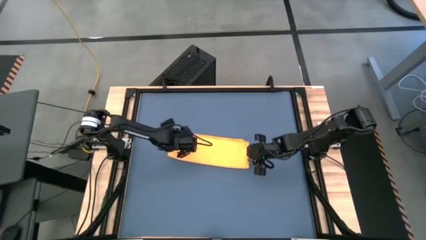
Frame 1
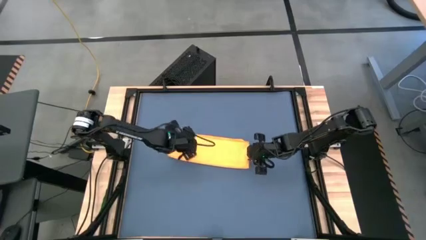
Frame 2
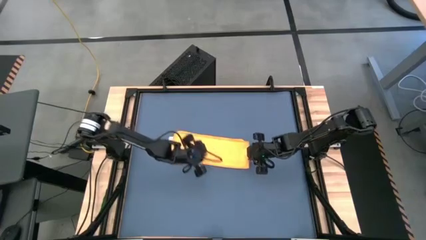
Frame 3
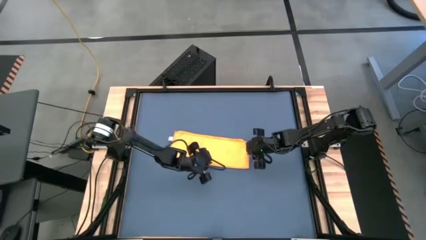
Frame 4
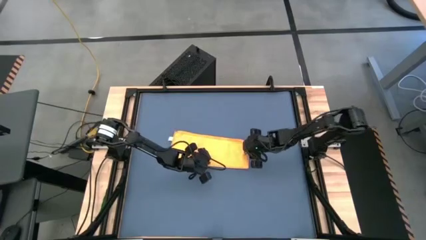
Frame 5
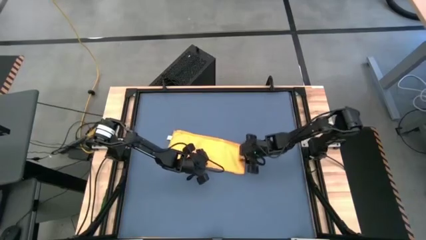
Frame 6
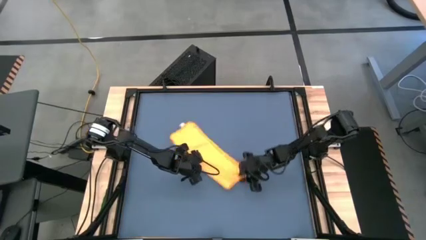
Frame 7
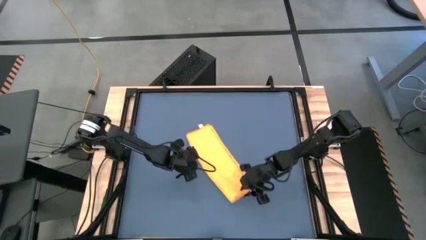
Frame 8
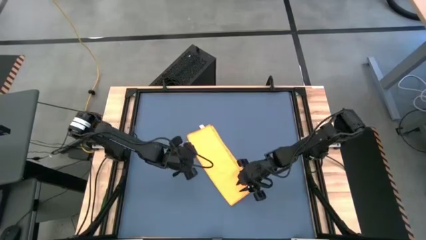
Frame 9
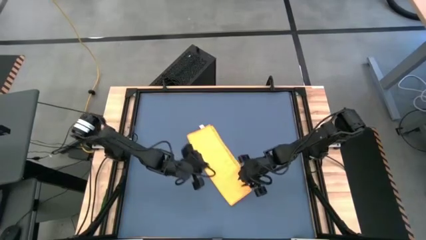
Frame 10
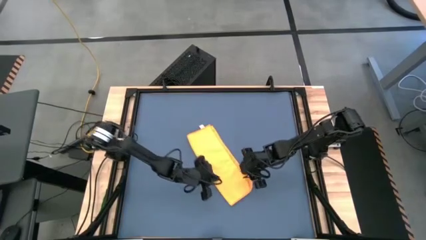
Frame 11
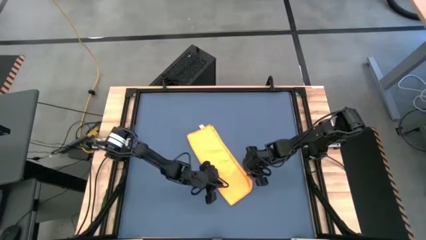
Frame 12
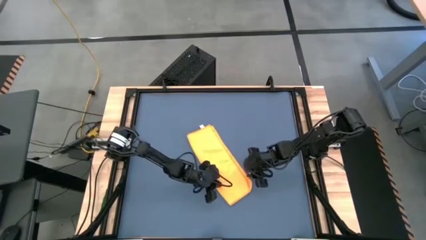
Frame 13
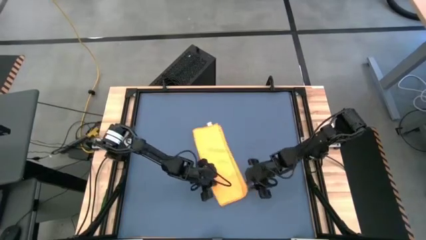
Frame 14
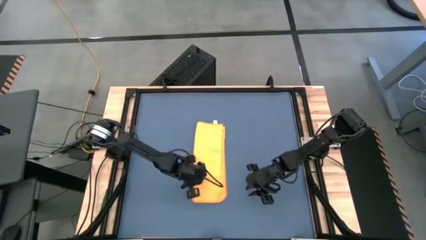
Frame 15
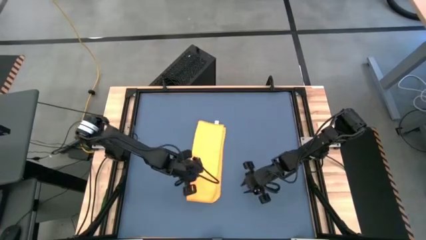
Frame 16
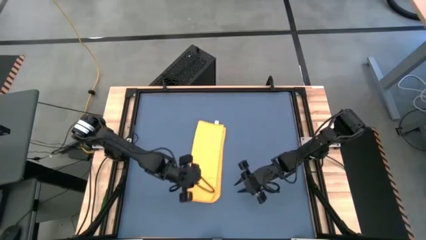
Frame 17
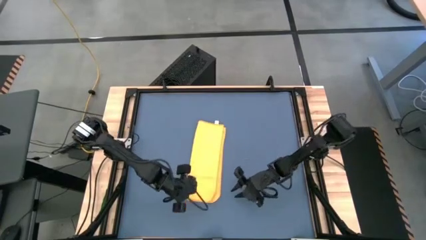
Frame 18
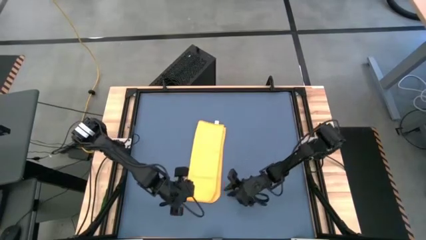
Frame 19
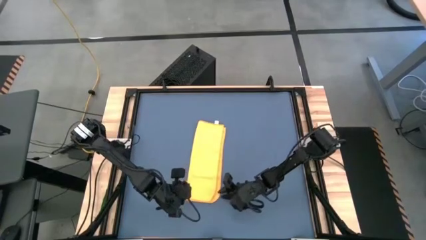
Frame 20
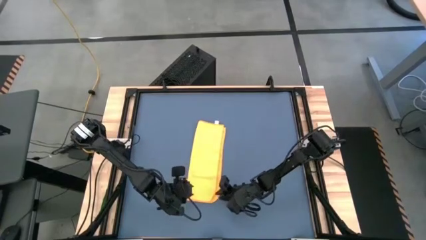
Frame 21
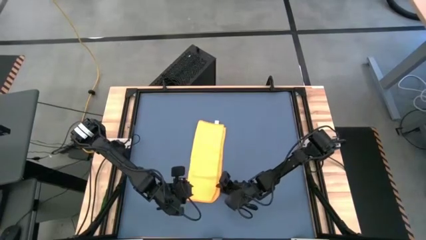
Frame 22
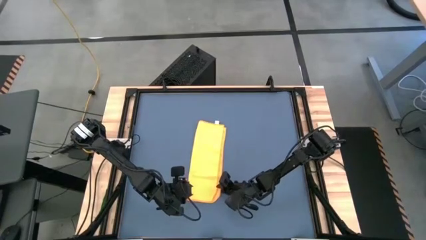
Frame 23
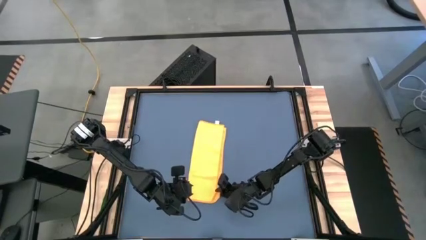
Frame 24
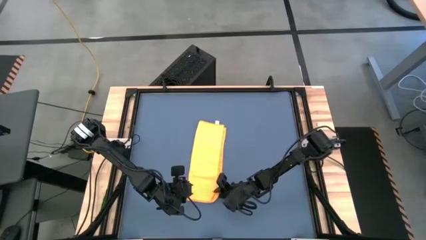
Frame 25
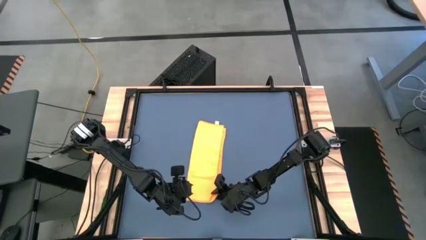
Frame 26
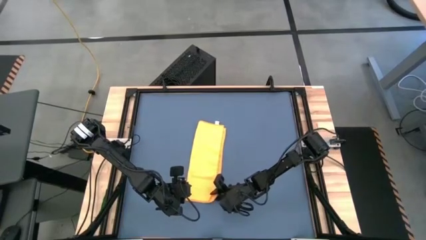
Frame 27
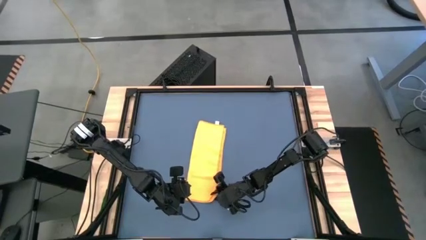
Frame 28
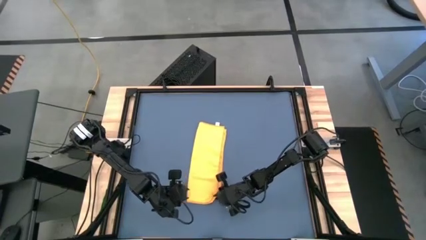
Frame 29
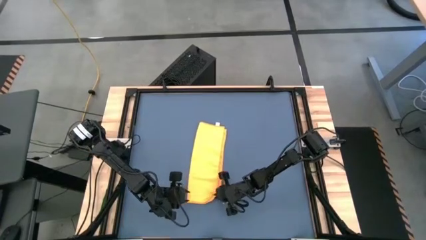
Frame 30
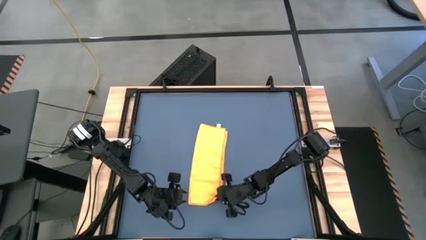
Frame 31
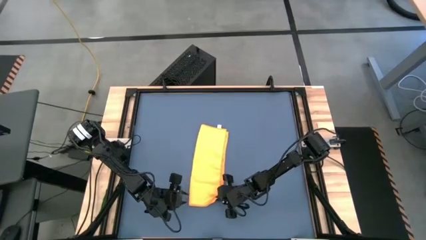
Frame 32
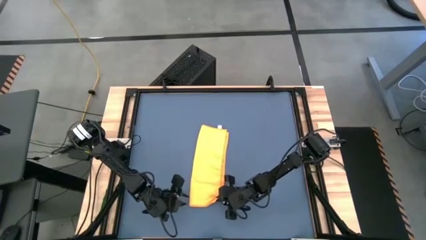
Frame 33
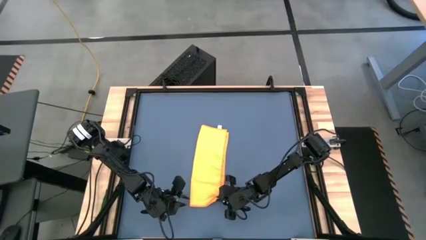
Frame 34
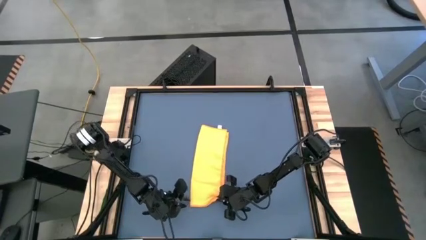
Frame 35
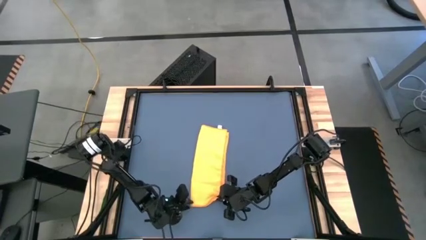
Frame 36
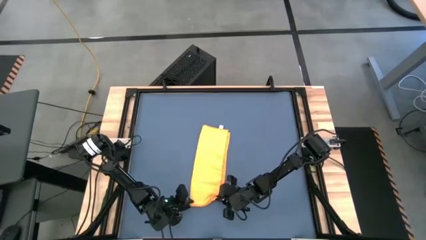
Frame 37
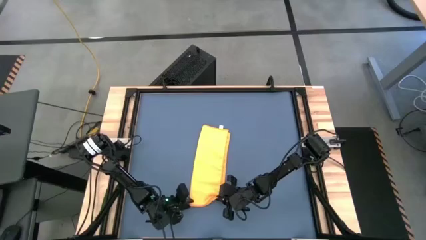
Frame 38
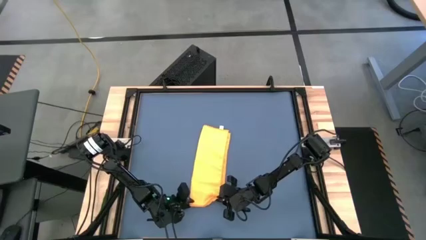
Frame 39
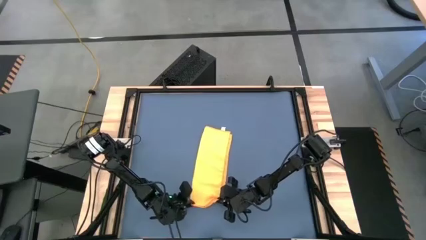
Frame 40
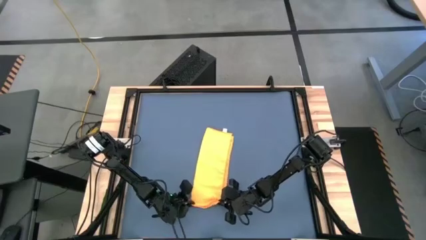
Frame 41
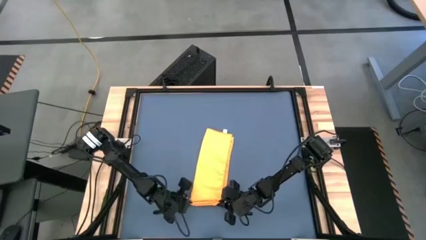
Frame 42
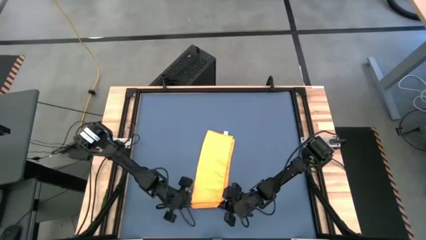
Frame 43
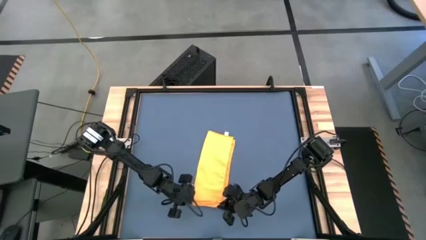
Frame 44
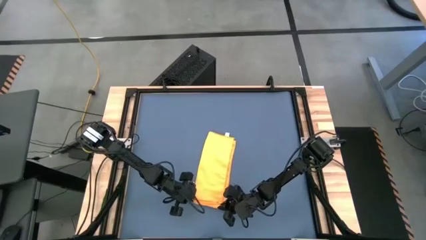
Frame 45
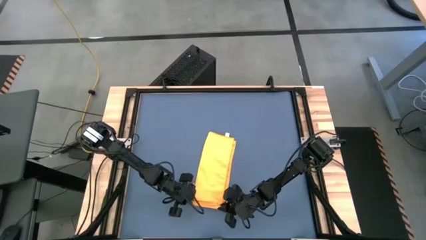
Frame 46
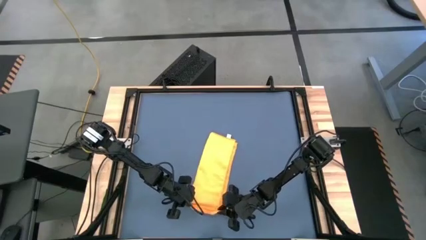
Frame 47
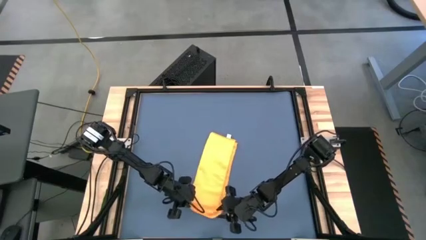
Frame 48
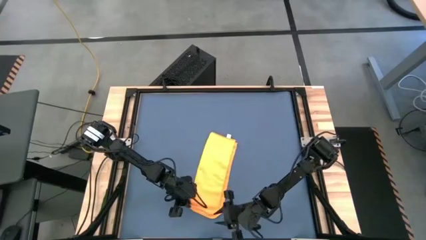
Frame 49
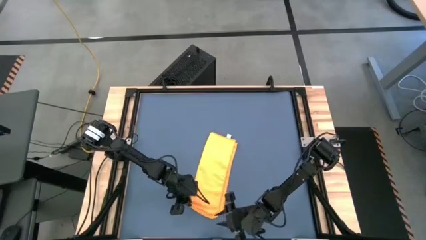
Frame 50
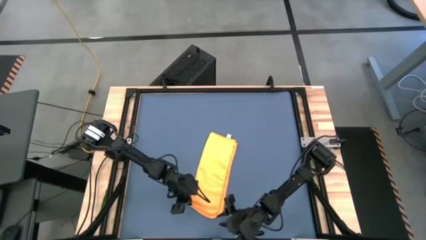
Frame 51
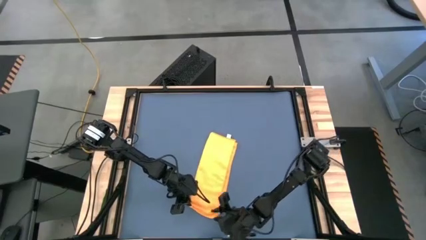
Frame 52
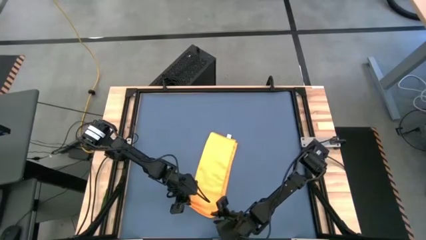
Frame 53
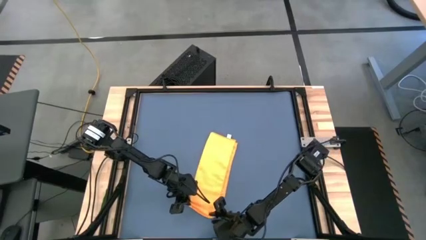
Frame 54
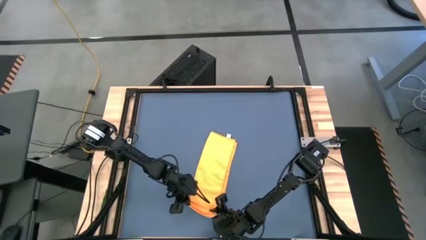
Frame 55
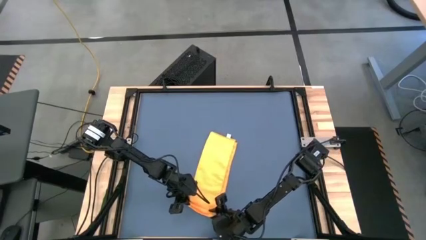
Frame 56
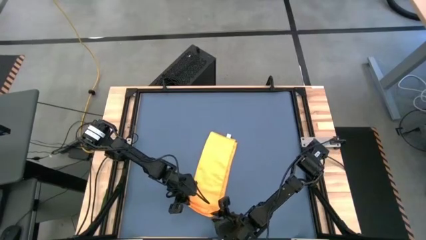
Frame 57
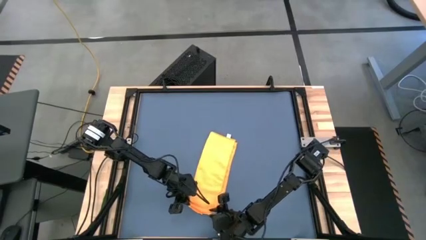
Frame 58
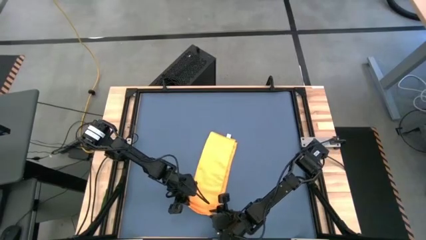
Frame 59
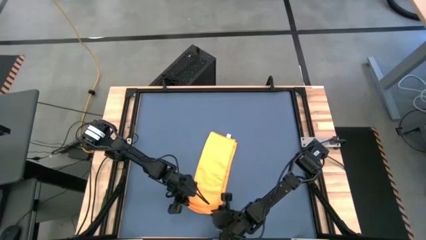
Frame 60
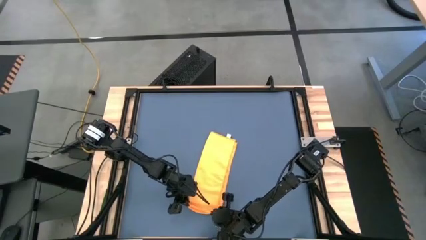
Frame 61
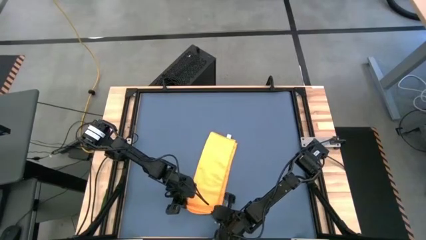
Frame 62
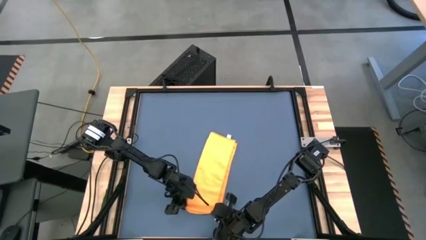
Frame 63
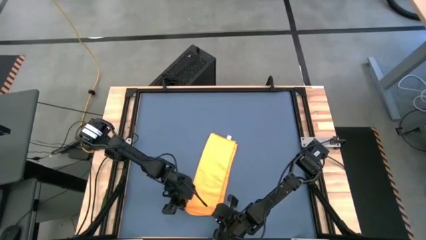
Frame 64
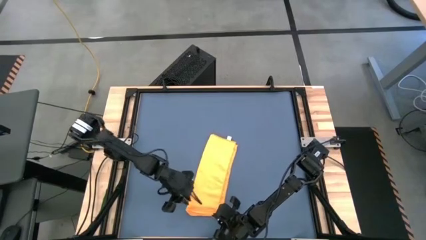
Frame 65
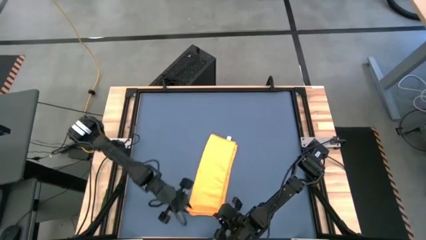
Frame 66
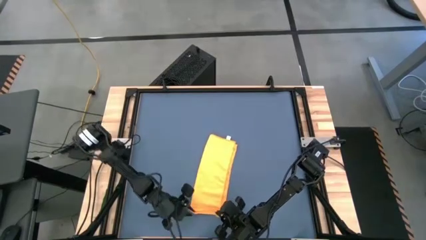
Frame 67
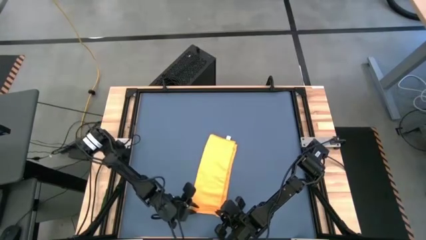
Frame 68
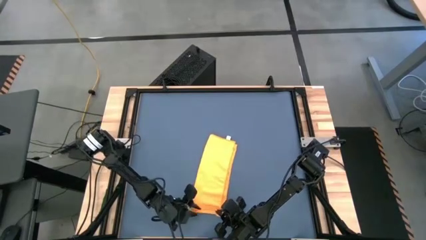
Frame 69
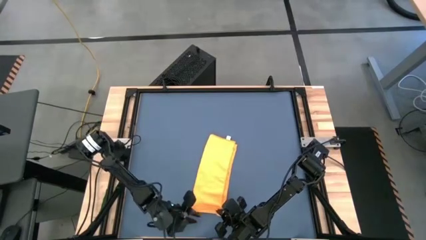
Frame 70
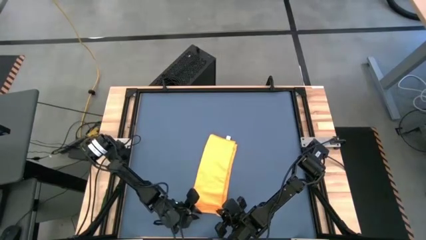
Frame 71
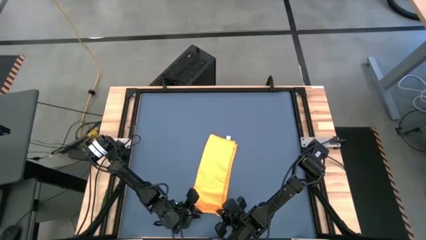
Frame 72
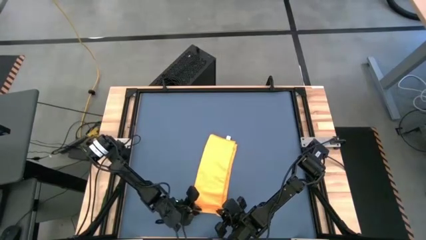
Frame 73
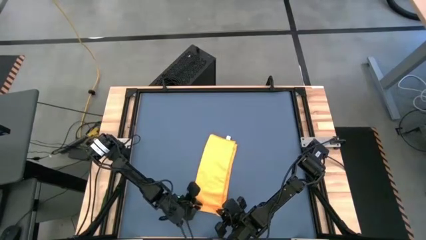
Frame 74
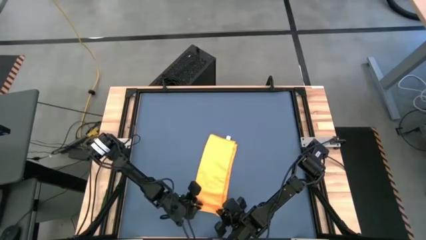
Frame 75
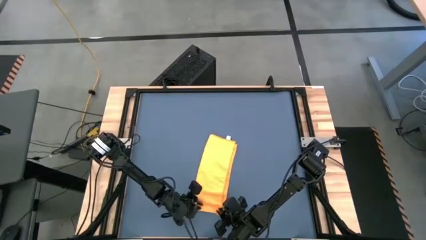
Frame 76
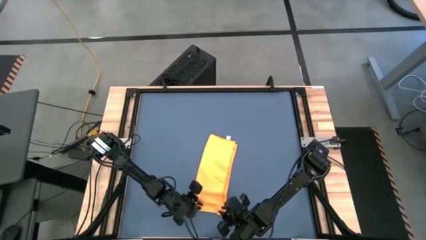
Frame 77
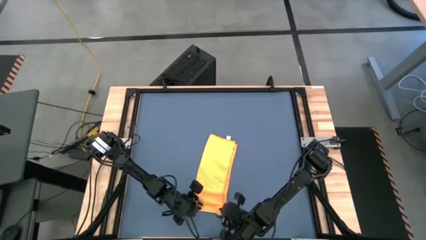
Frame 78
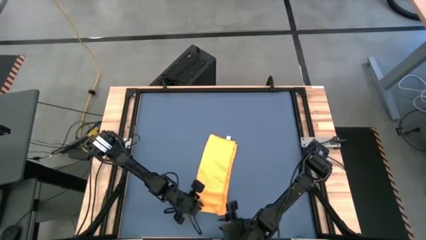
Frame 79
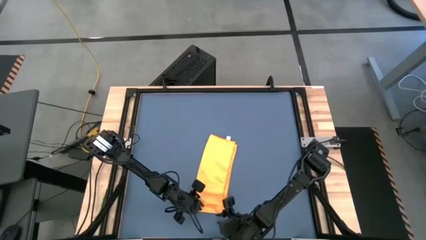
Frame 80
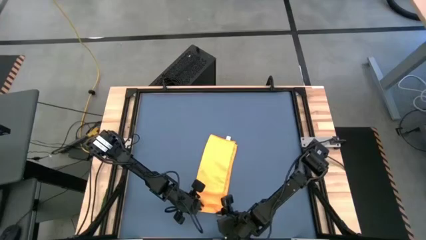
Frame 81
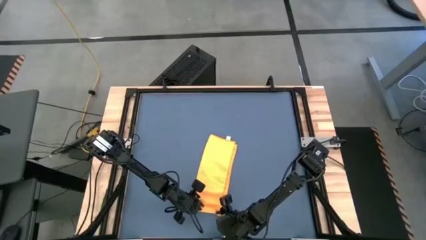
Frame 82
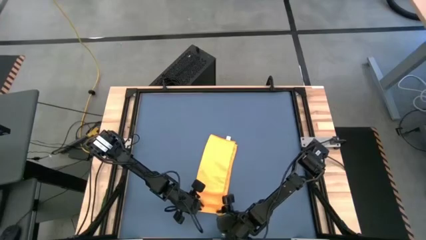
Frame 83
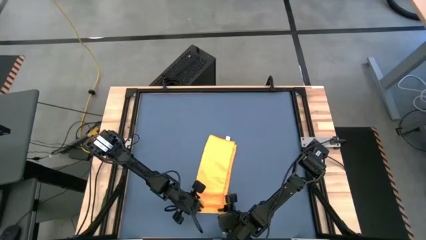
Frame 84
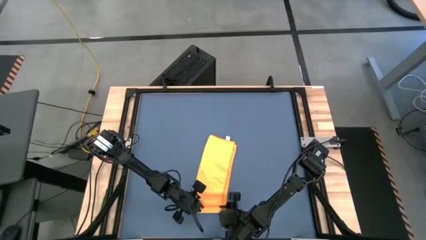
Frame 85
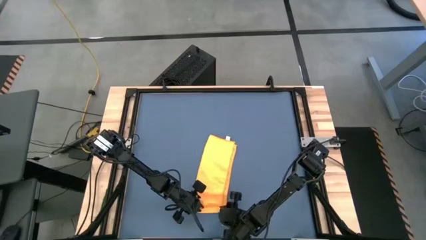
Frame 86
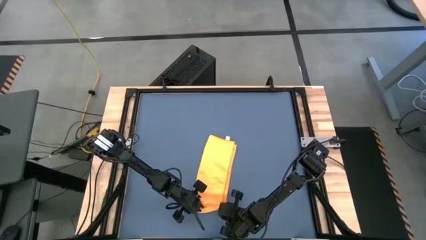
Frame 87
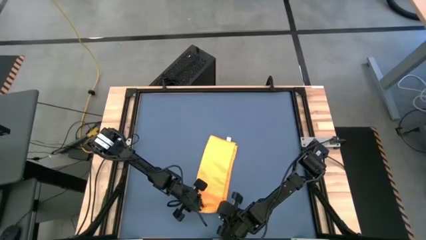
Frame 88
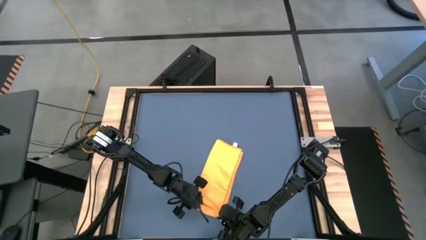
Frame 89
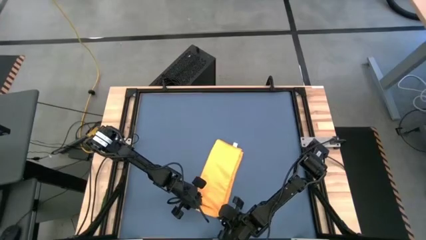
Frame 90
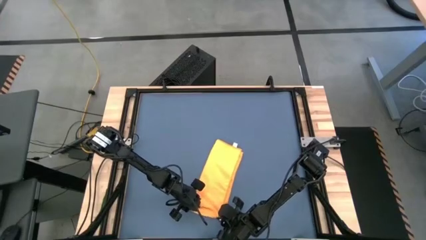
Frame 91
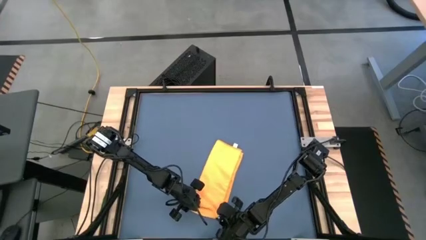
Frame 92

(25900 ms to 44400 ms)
Task: Roll towel
Roll the orange microfiber cloth
